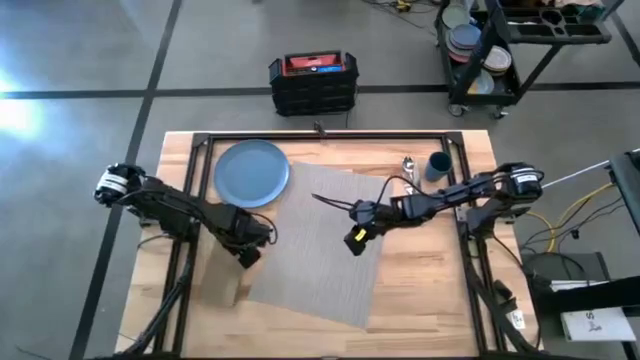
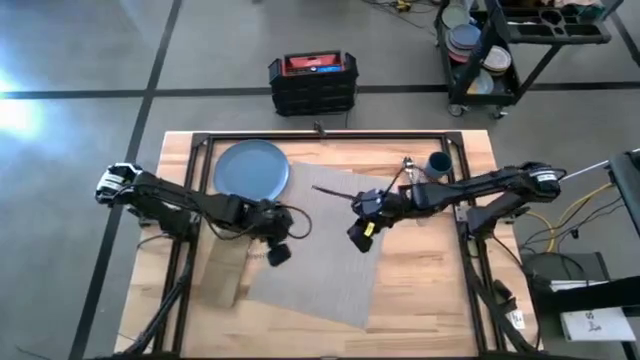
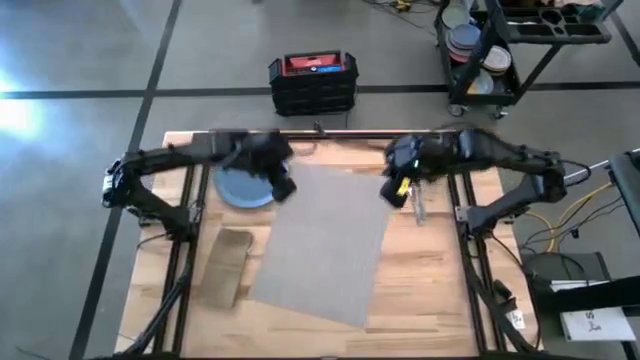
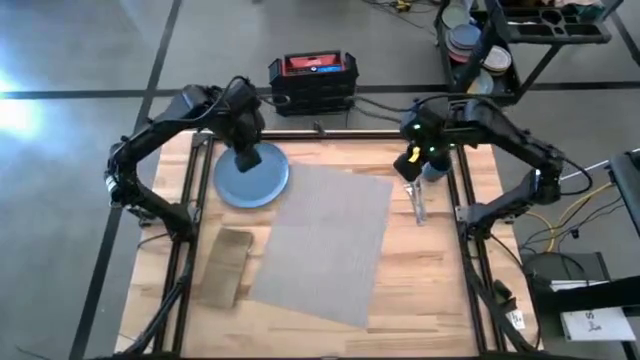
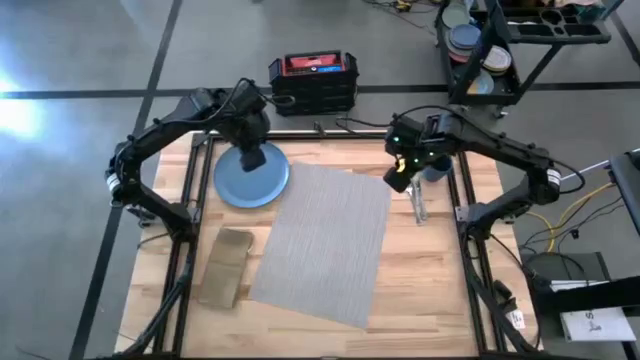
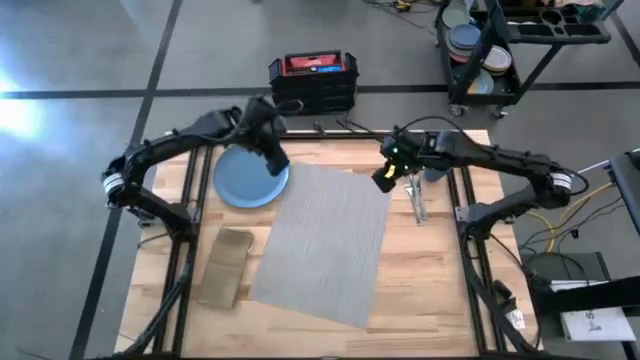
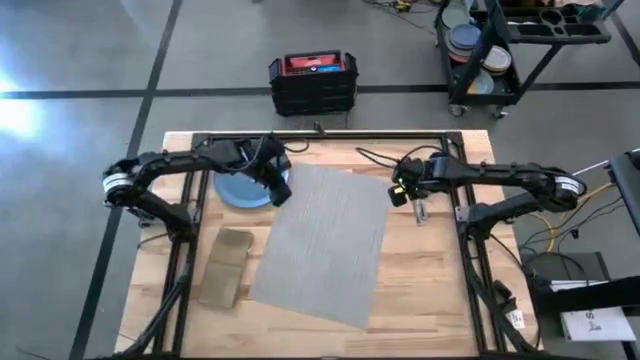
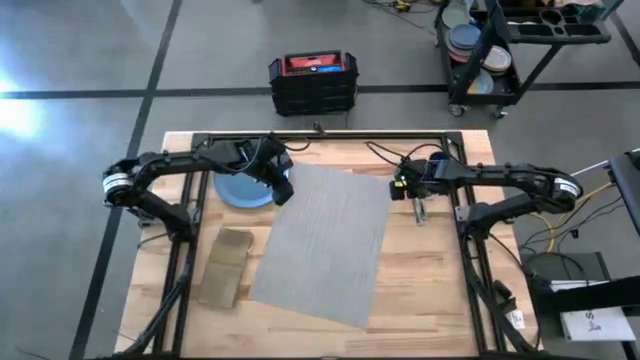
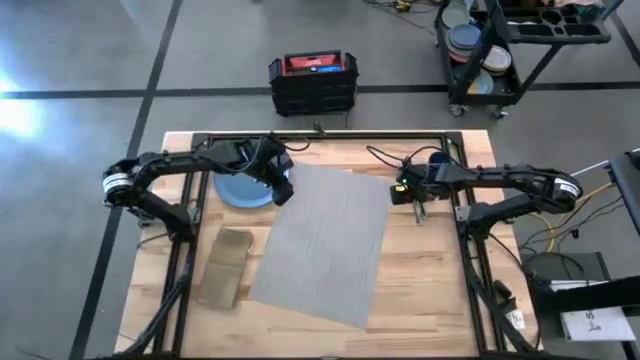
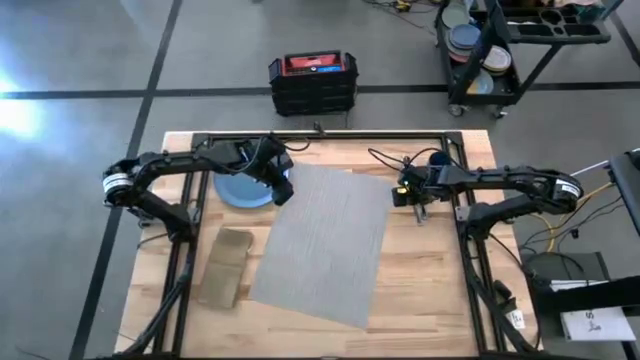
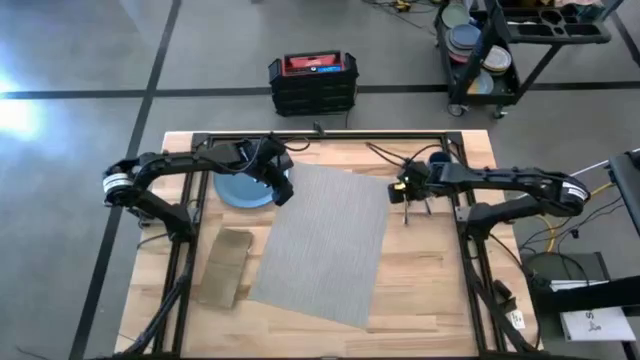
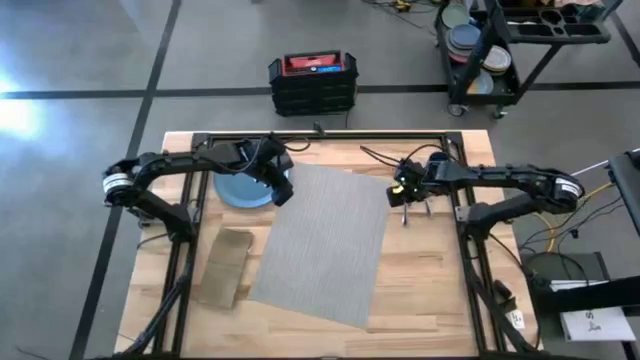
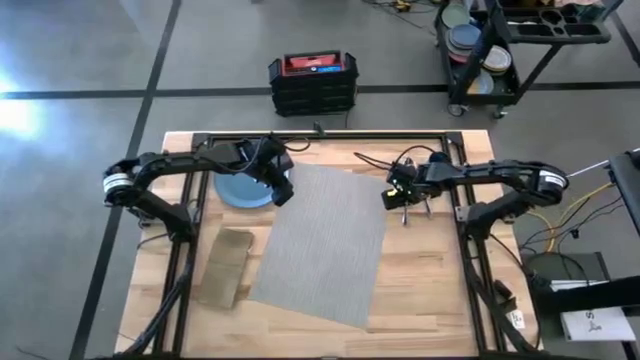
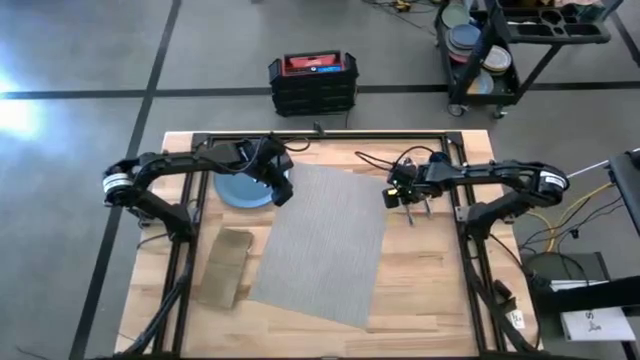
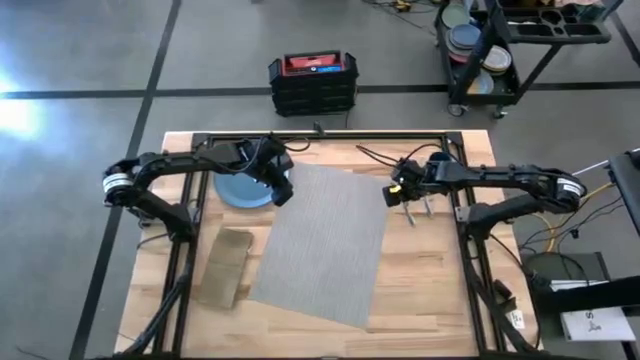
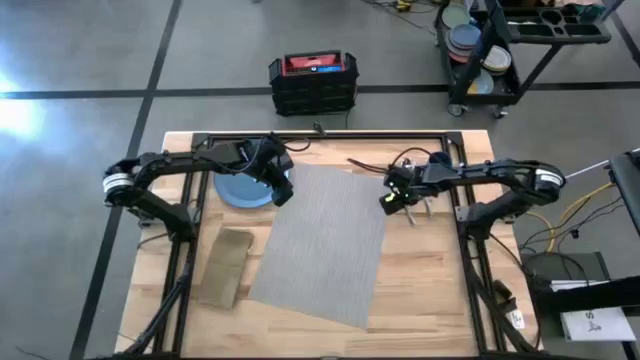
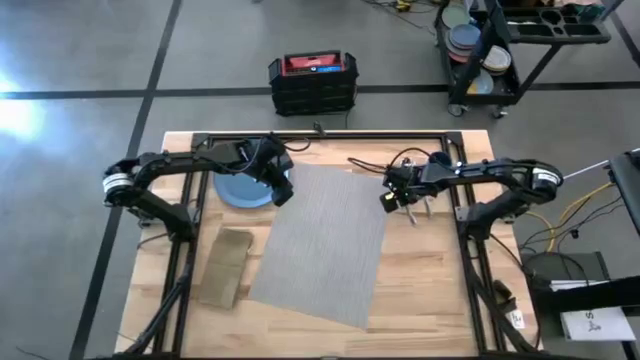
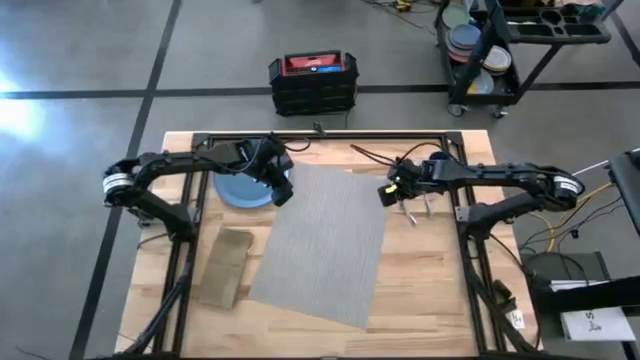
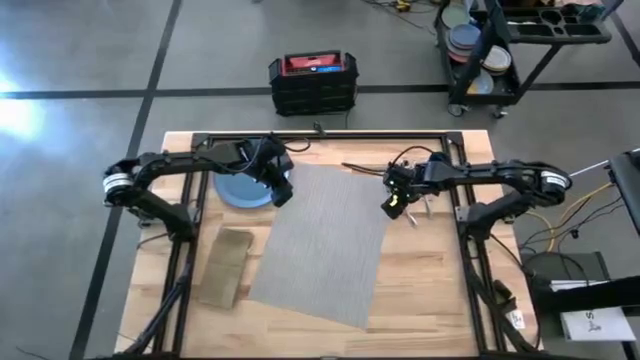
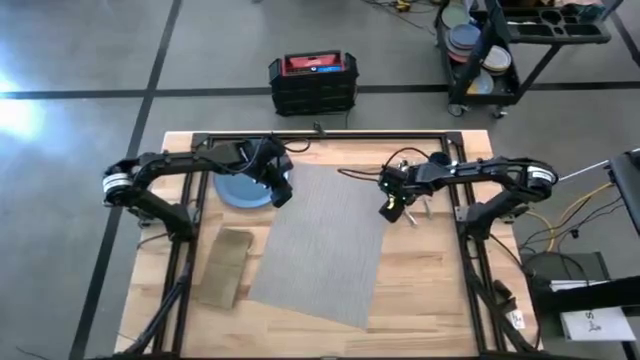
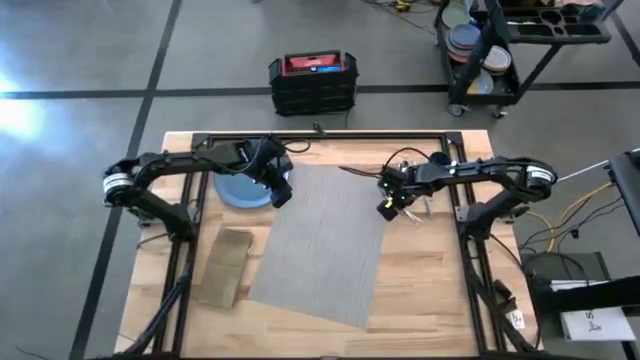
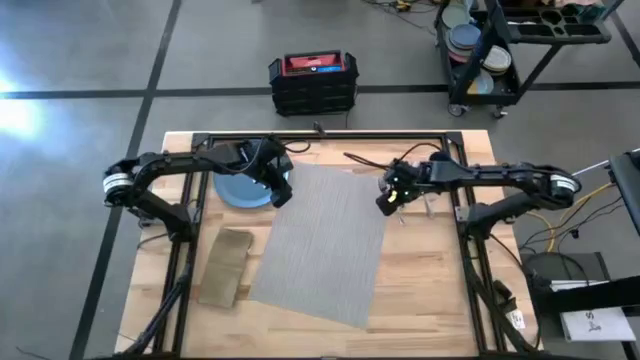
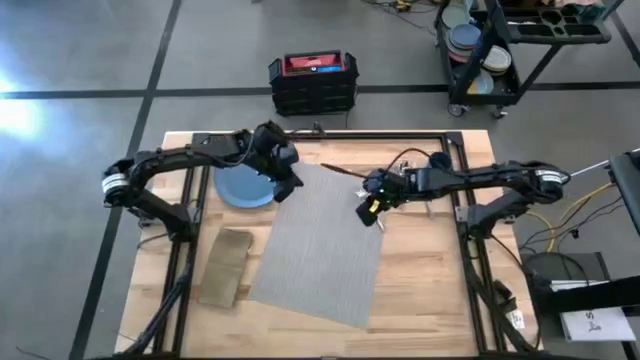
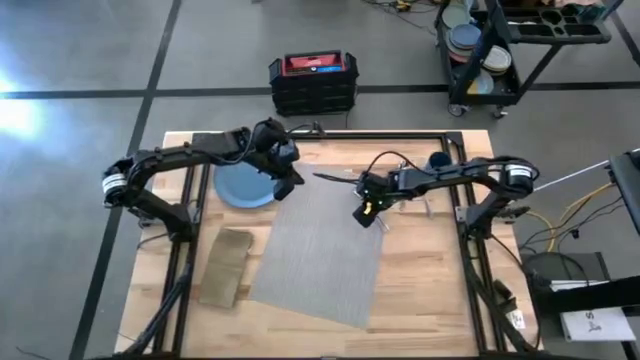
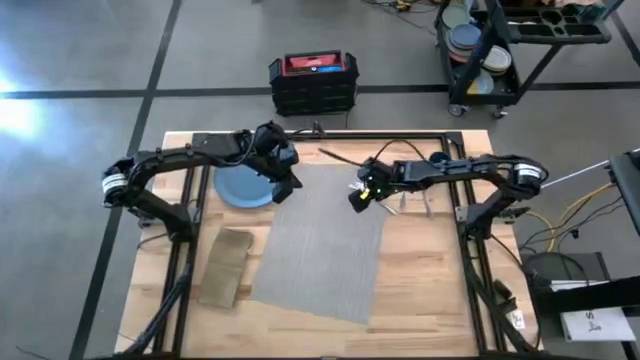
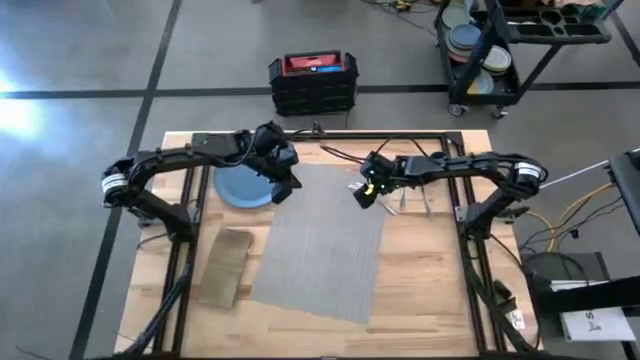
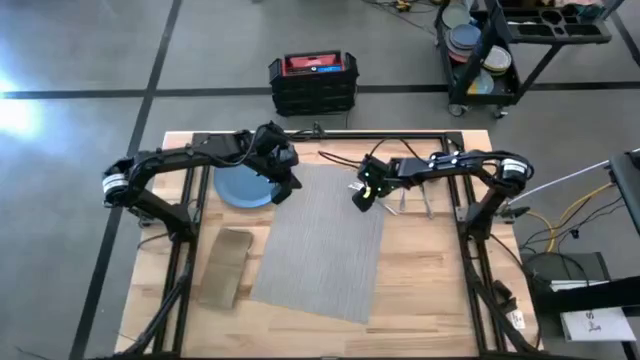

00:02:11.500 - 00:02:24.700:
Task: Set table place
Put the silver fork on the brown table napkin

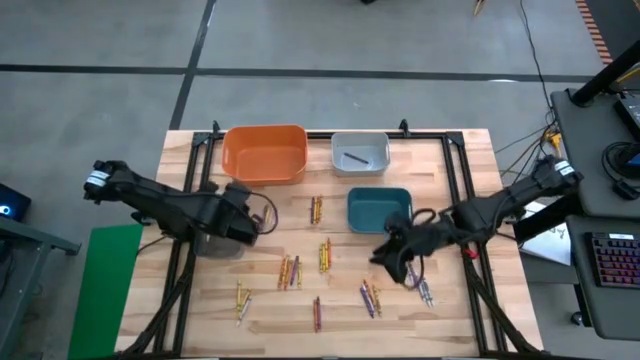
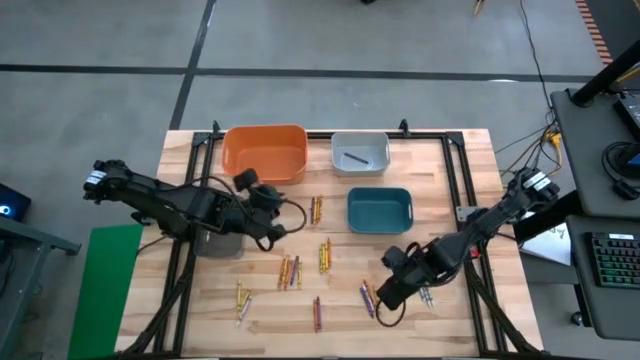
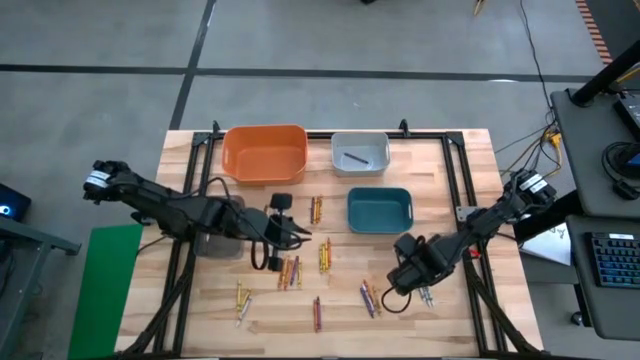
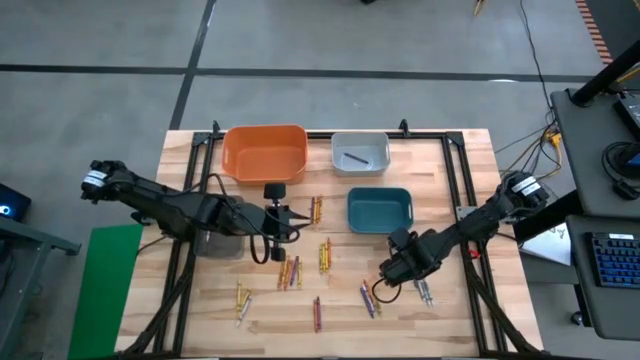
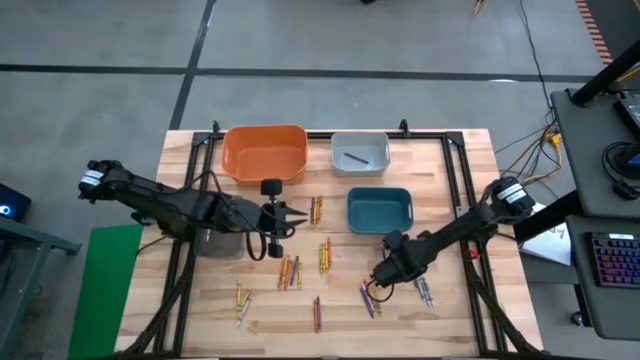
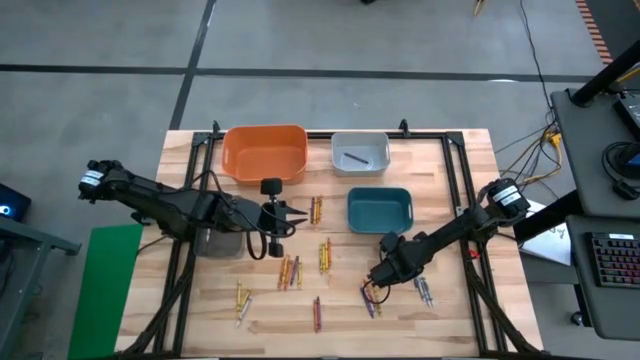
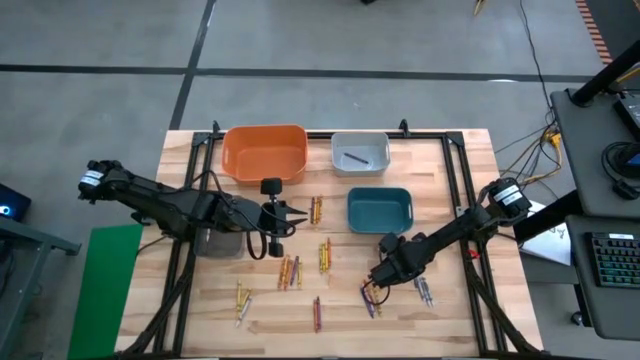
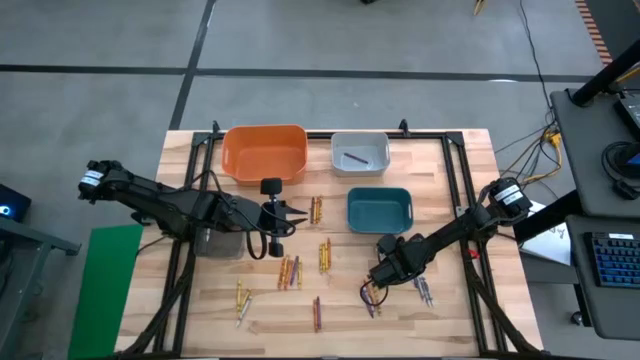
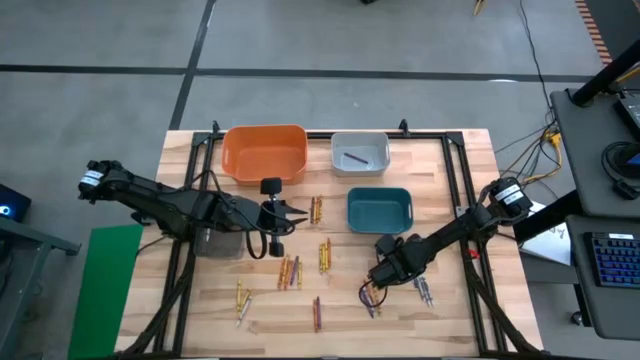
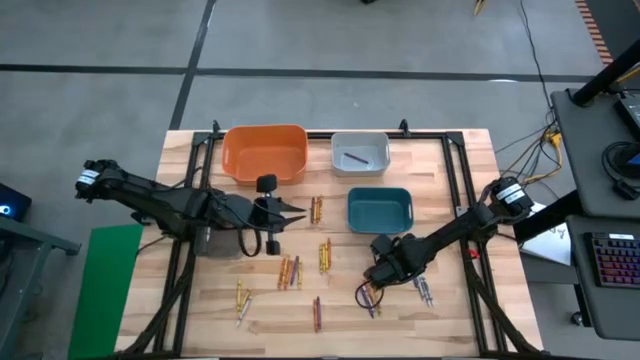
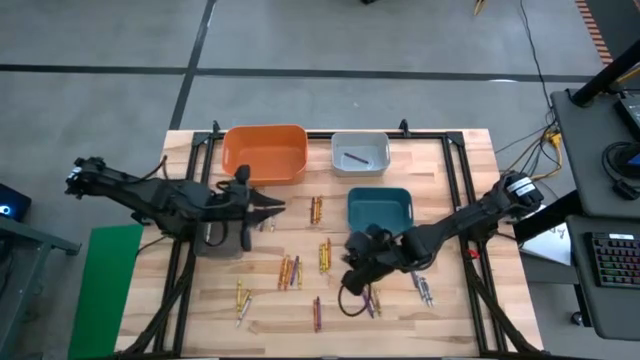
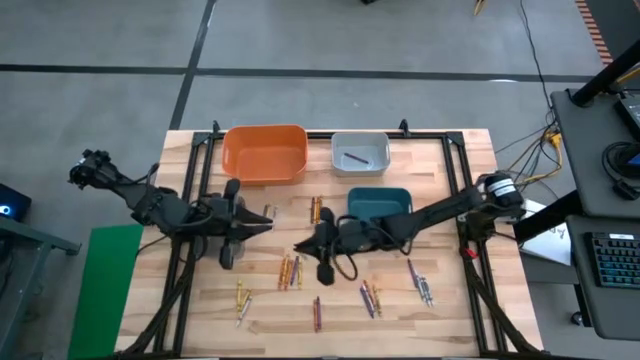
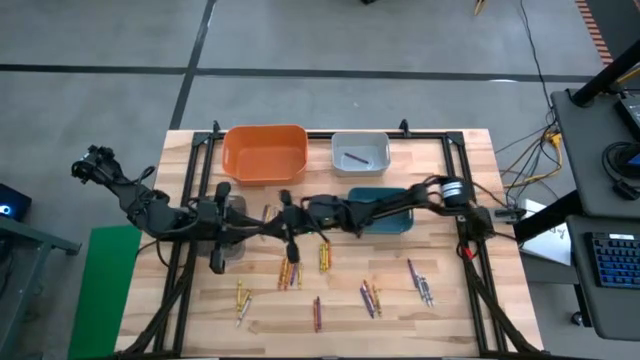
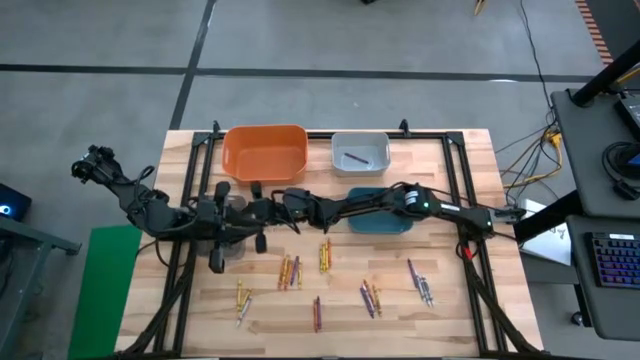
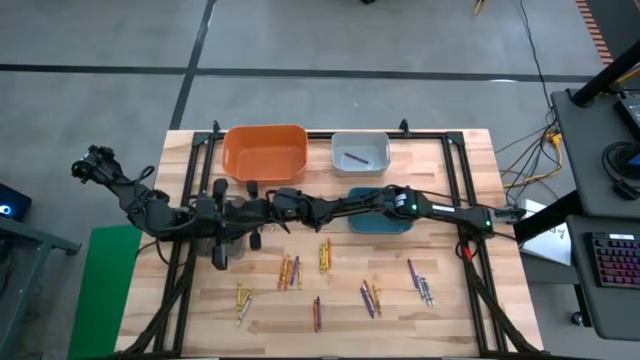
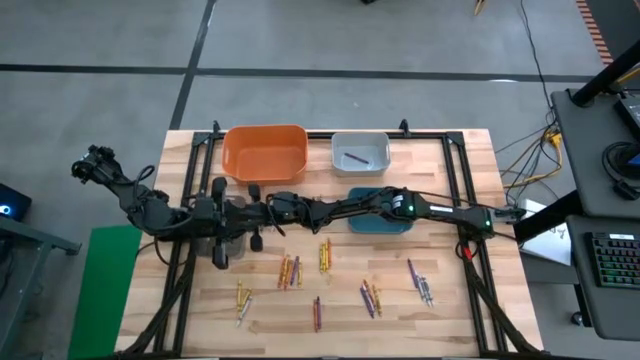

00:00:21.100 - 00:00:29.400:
Task: Sort crayons
Put the white crayon into the black bin
